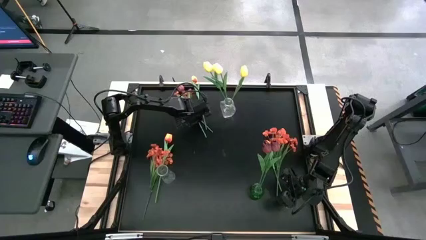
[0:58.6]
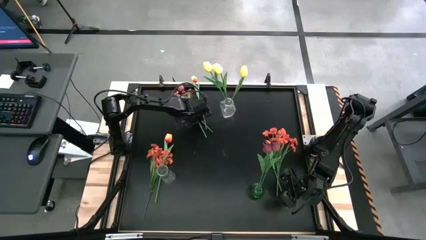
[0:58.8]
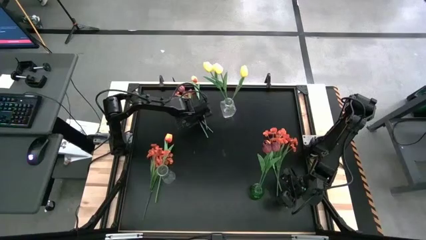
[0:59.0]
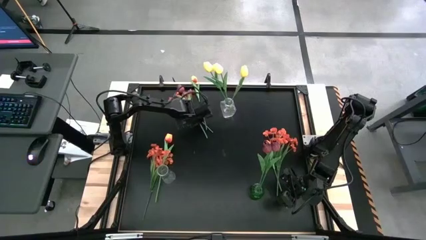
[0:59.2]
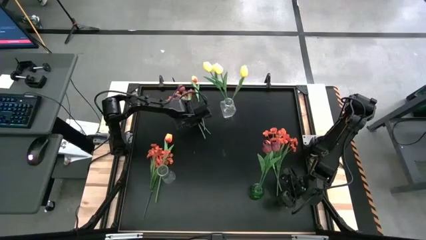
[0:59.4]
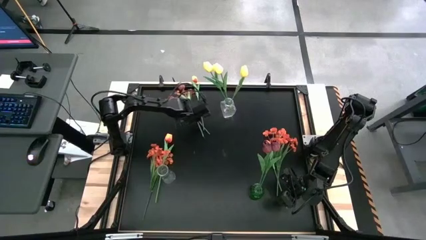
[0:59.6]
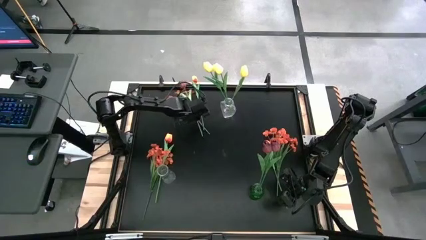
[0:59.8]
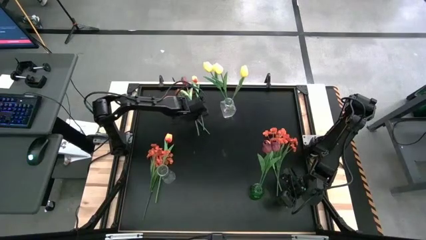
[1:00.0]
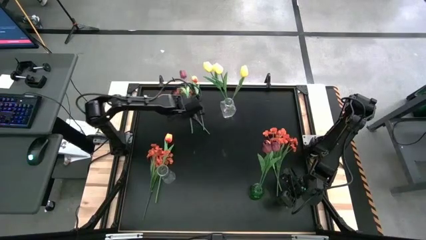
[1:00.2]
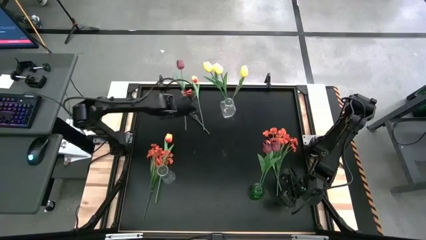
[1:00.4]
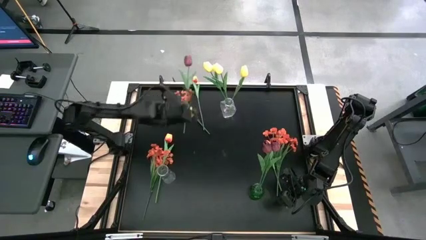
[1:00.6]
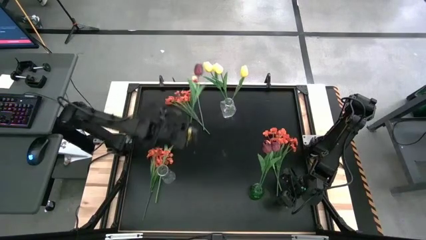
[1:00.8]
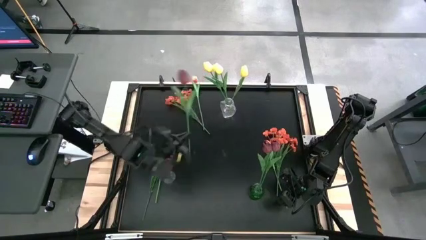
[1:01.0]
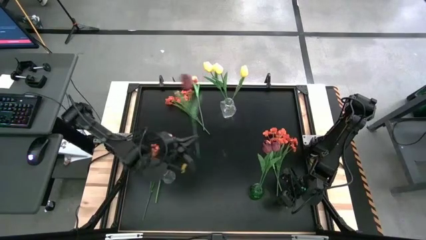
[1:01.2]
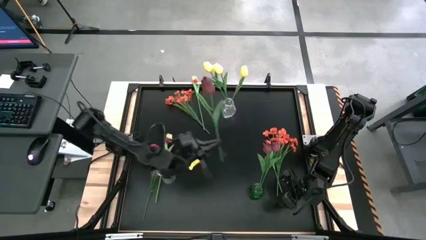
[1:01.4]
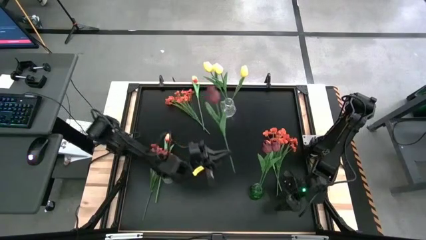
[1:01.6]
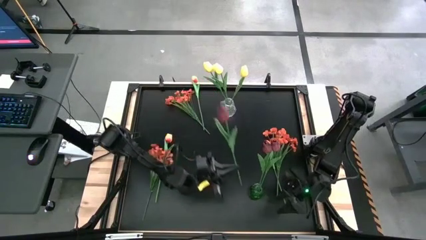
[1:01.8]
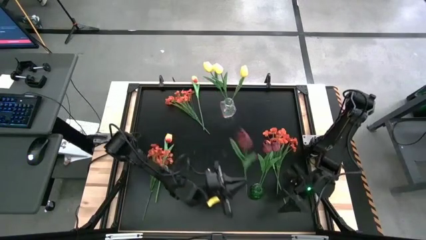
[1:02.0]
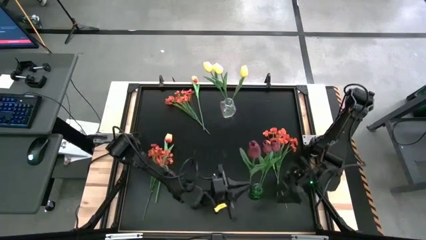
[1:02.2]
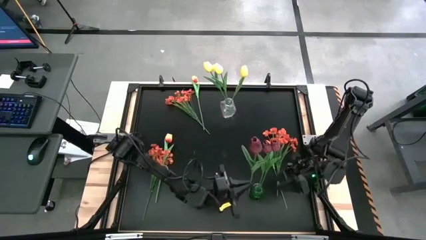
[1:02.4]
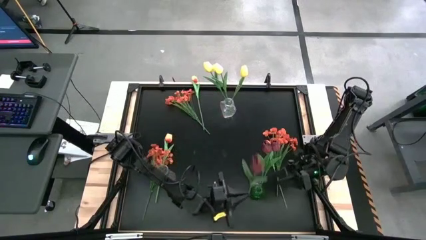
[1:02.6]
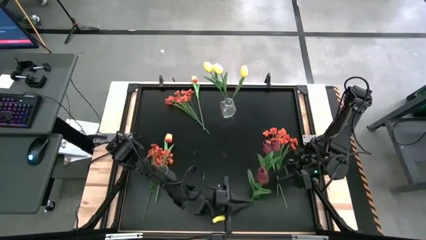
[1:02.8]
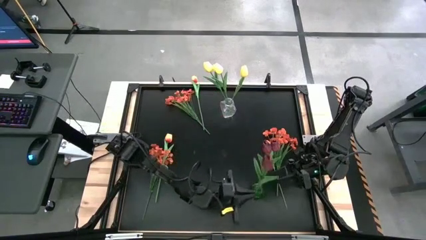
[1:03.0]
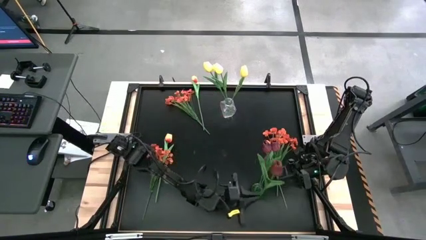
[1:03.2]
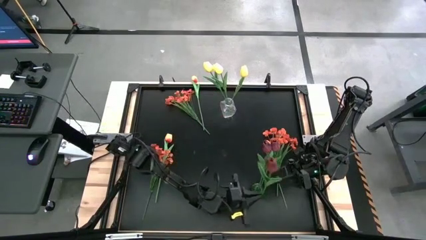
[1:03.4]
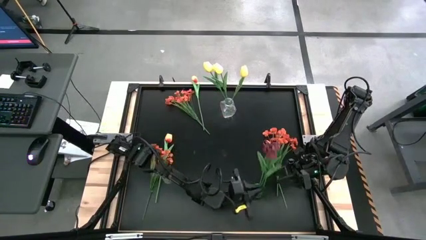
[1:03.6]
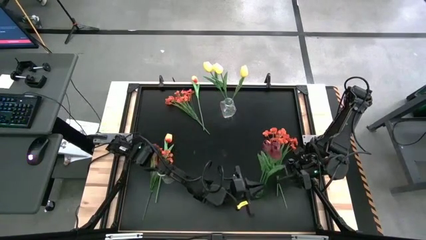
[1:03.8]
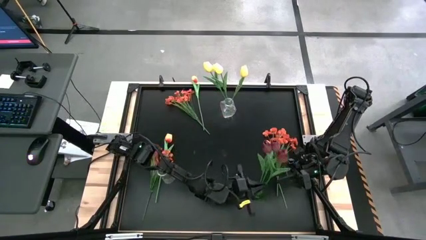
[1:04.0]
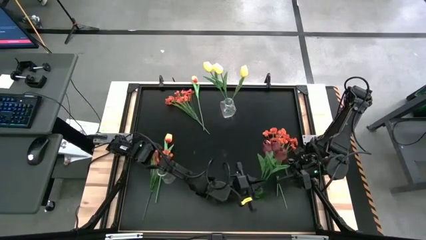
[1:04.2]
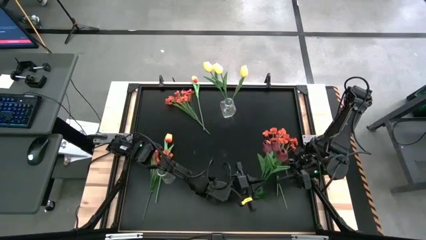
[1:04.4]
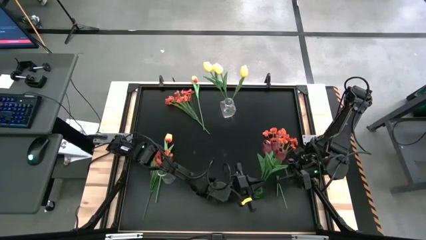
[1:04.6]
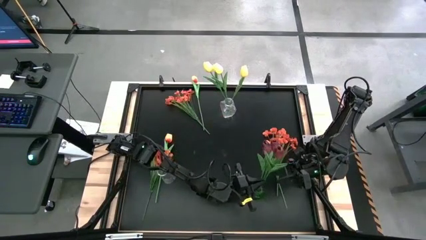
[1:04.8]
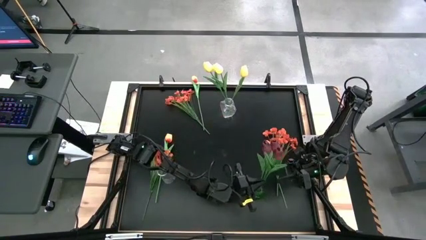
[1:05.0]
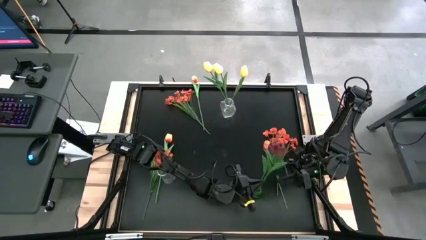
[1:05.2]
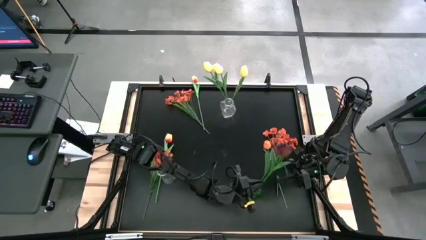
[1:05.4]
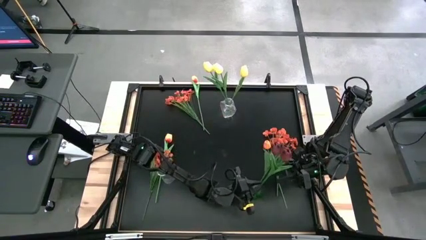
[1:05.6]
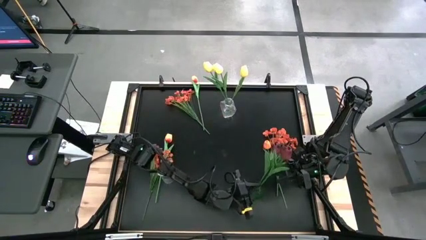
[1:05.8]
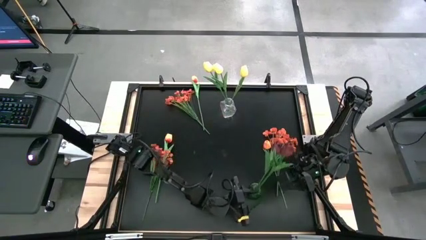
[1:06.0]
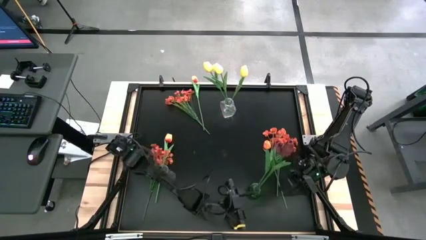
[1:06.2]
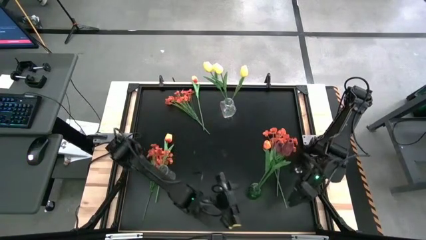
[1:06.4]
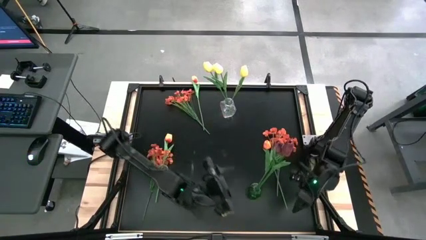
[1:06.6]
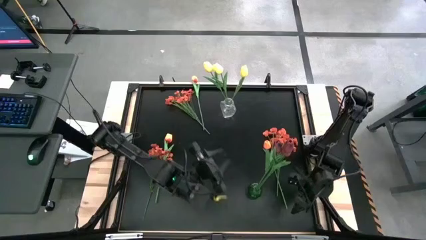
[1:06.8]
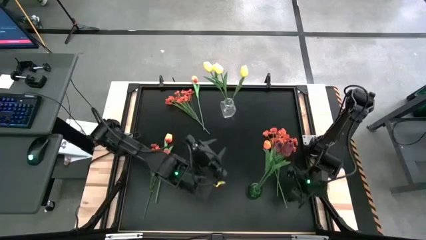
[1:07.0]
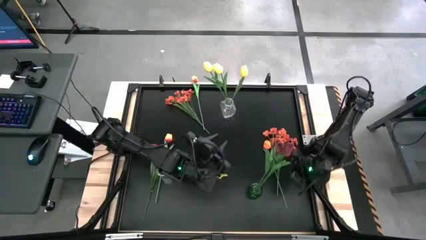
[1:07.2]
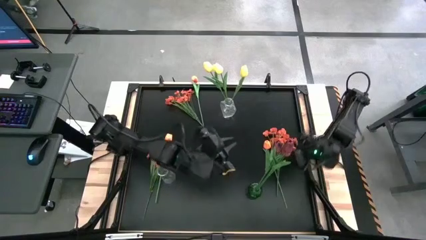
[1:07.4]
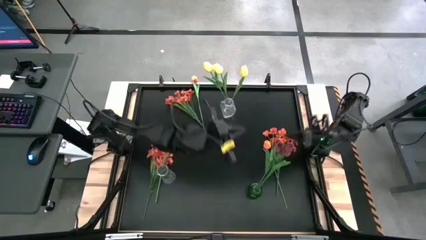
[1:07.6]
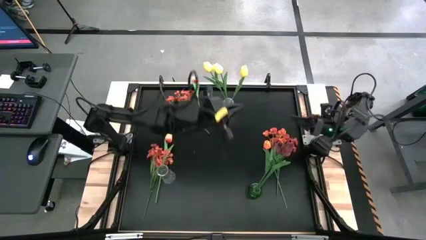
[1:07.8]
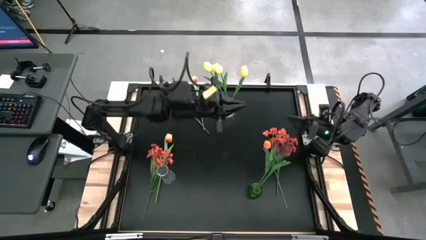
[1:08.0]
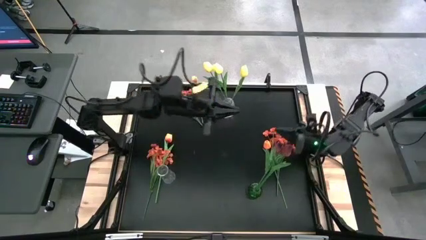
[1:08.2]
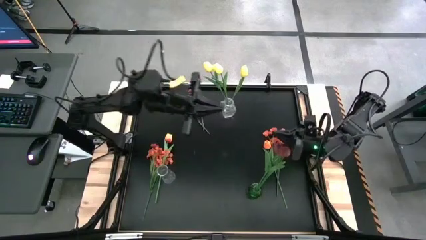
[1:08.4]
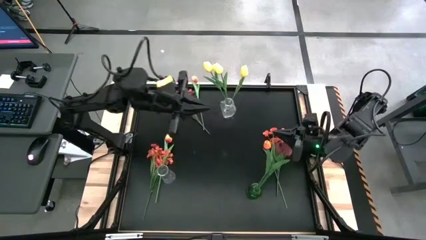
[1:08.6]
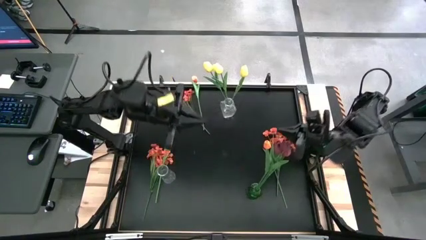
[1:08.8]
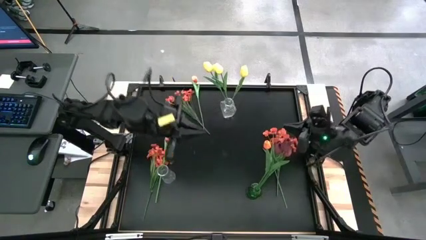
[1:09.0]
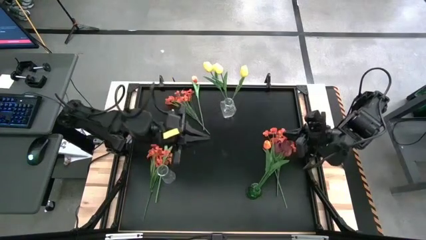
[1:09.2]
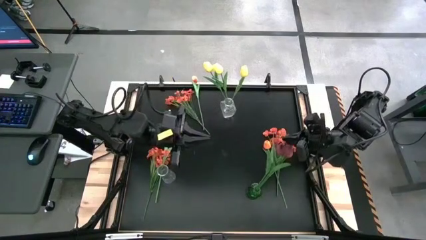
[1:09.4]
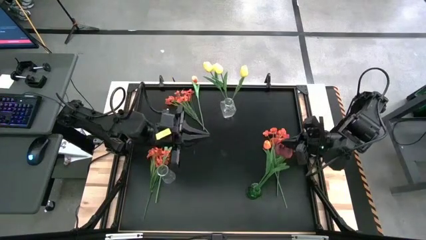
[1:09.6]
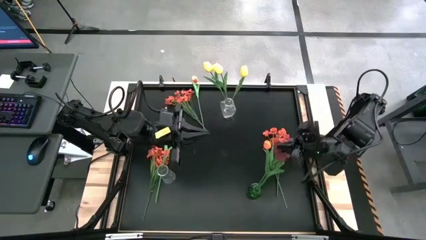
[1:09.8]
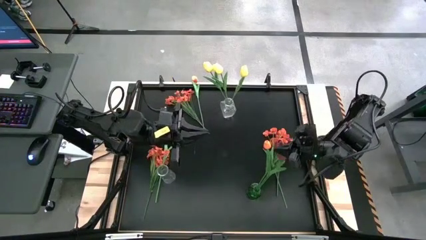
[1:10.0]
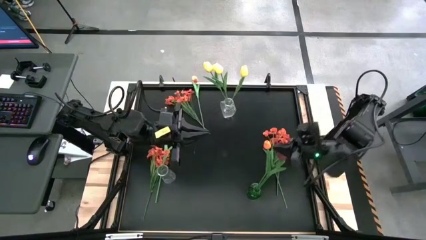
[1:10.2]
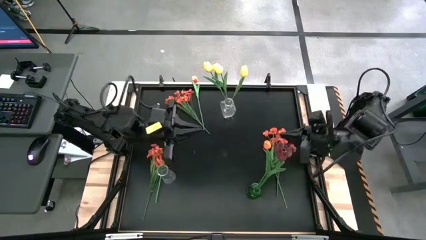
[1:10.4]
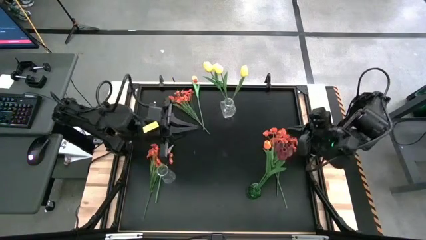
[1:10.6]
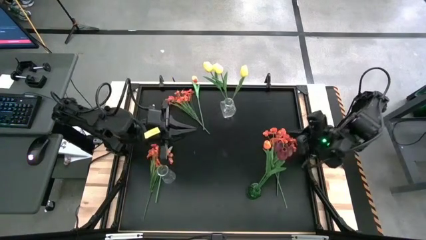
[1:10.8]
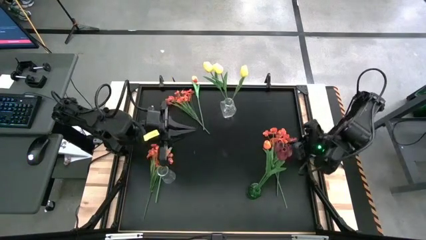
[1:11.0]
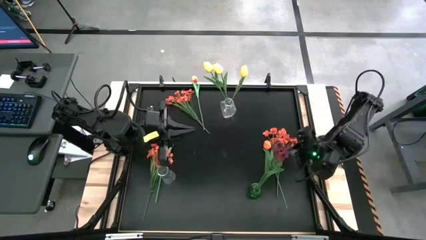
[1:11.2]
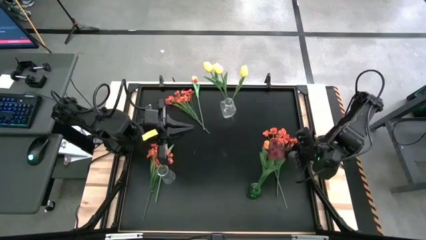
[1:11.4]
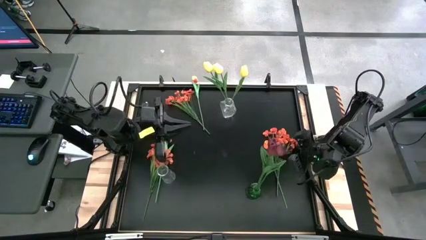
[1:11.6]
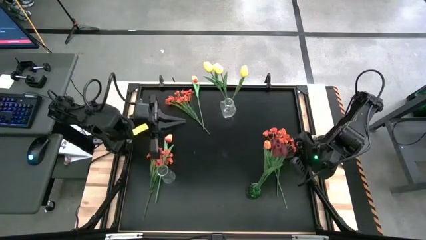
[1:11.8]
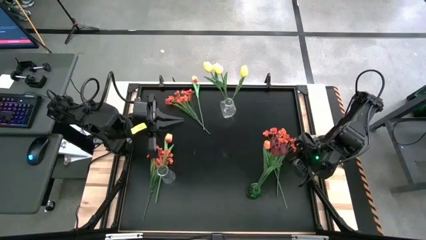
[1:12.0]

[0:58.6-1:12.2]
Task: Sort flowers into vase by color
Put the red tulip into the green vase
